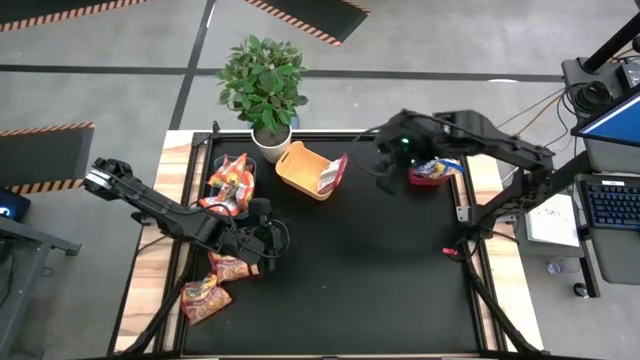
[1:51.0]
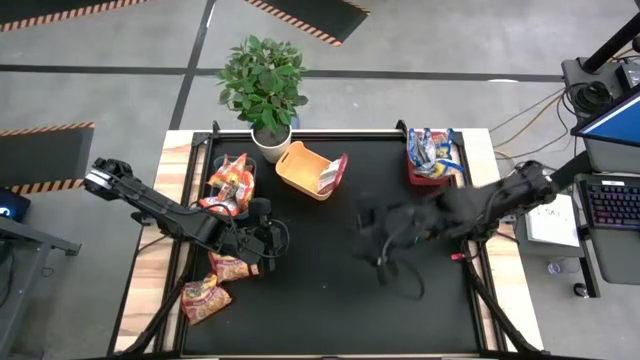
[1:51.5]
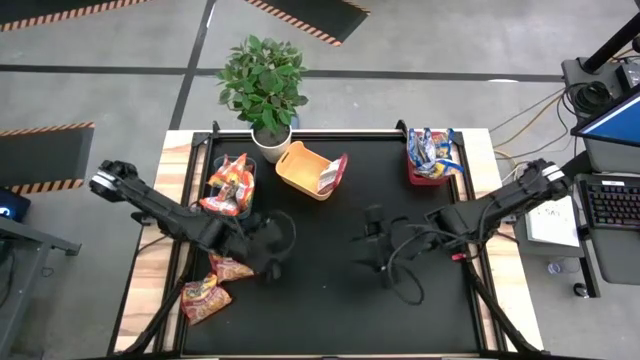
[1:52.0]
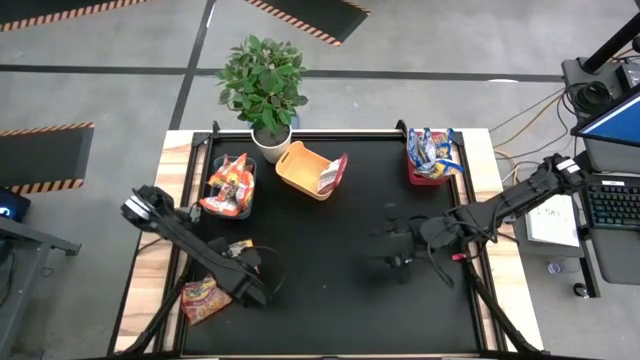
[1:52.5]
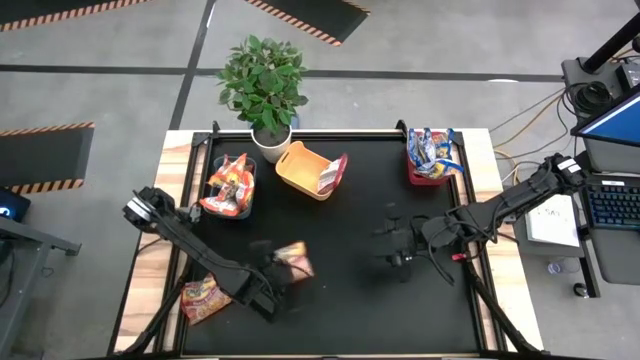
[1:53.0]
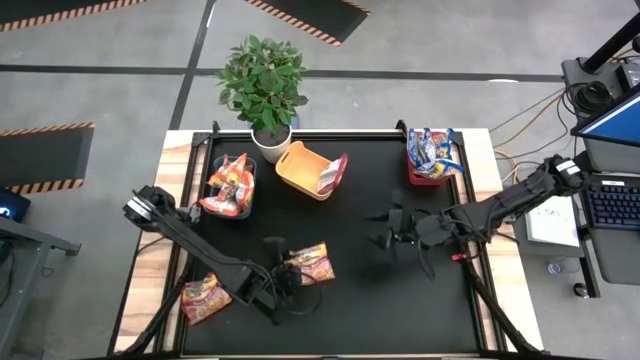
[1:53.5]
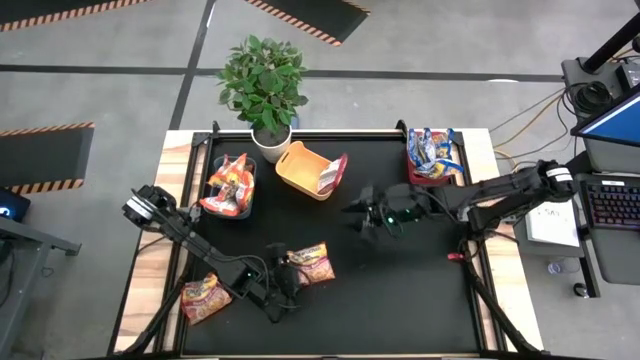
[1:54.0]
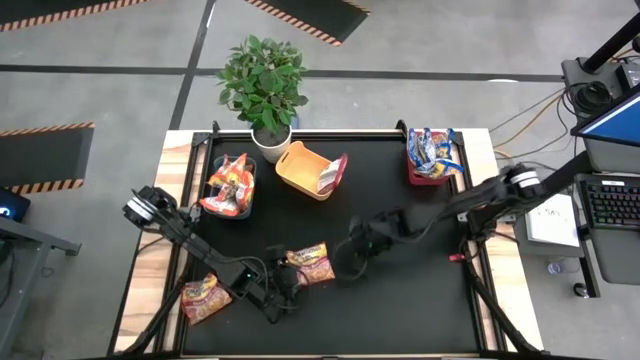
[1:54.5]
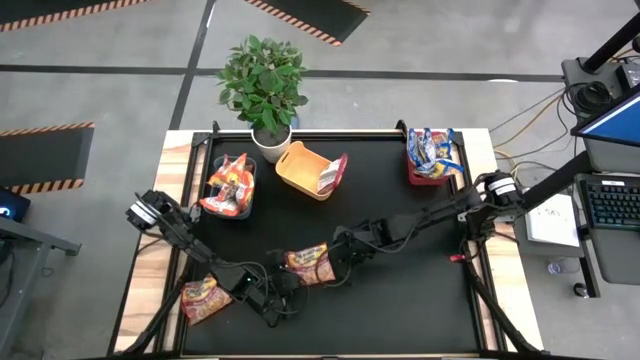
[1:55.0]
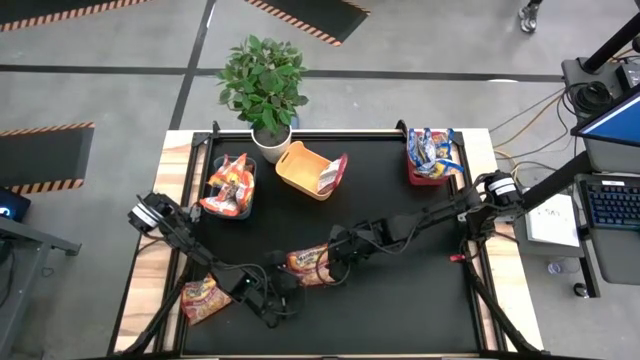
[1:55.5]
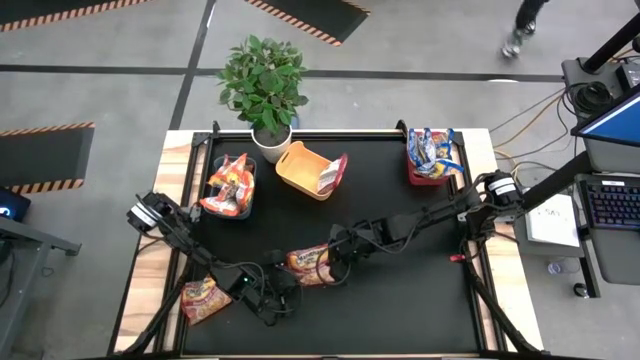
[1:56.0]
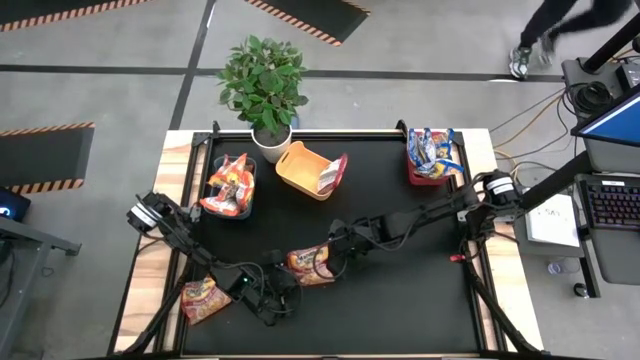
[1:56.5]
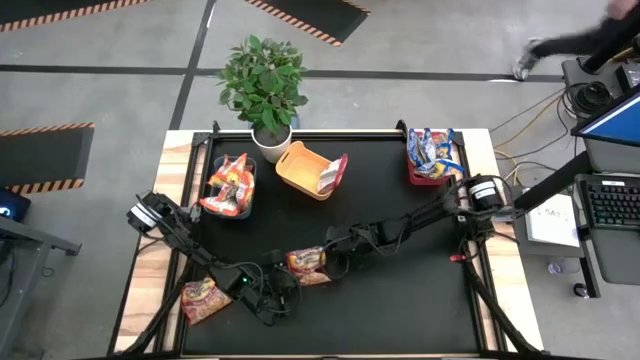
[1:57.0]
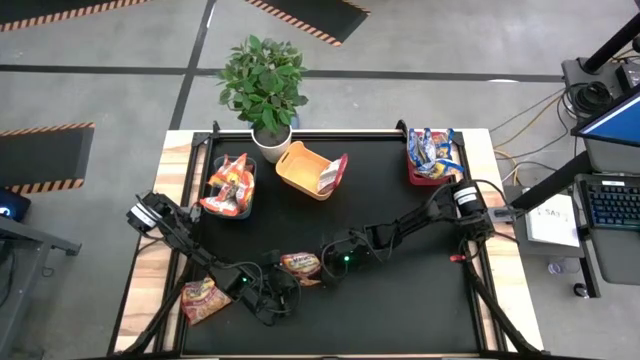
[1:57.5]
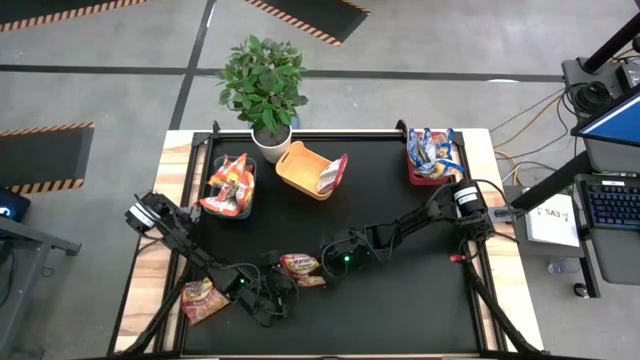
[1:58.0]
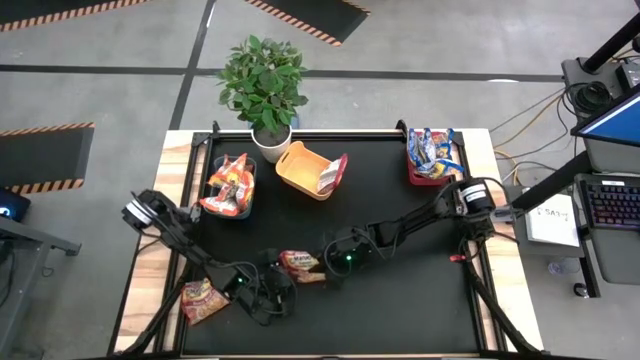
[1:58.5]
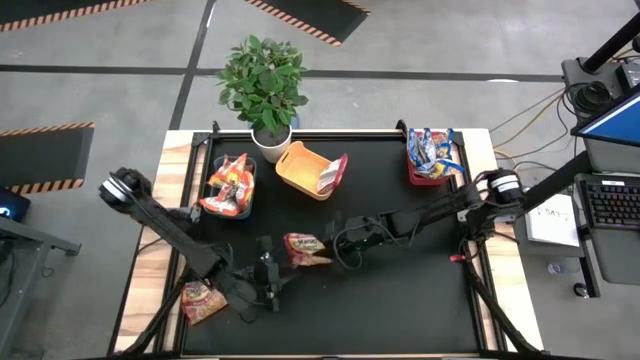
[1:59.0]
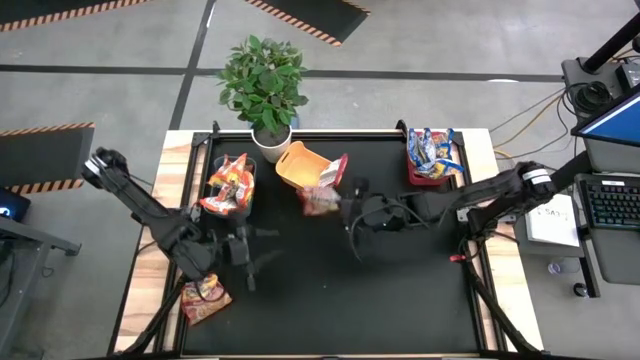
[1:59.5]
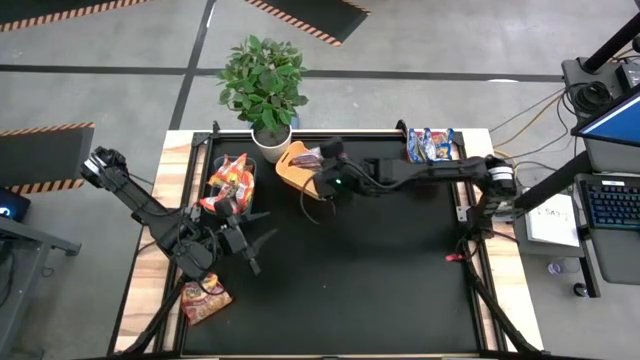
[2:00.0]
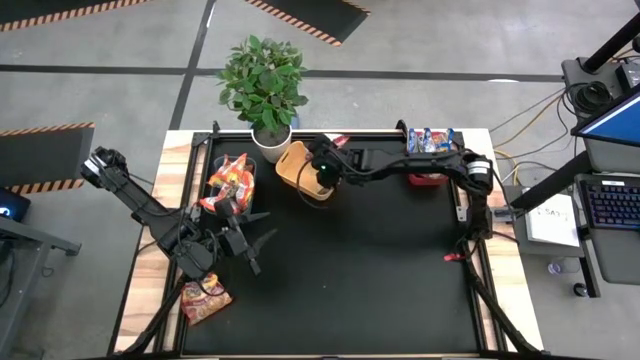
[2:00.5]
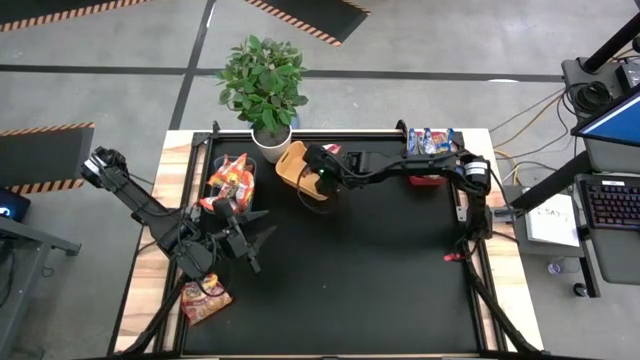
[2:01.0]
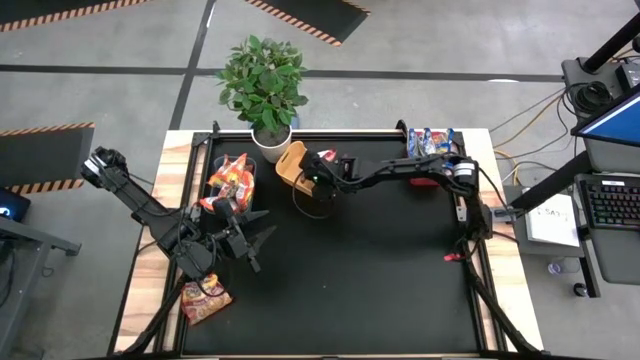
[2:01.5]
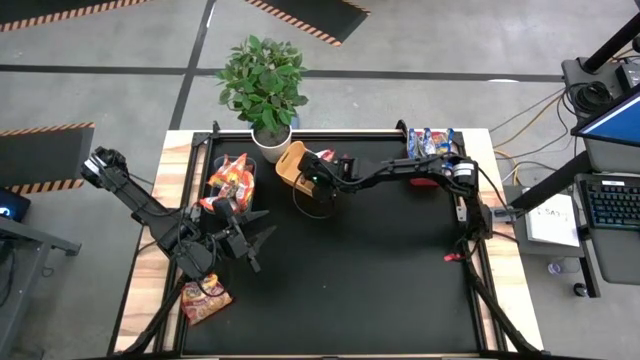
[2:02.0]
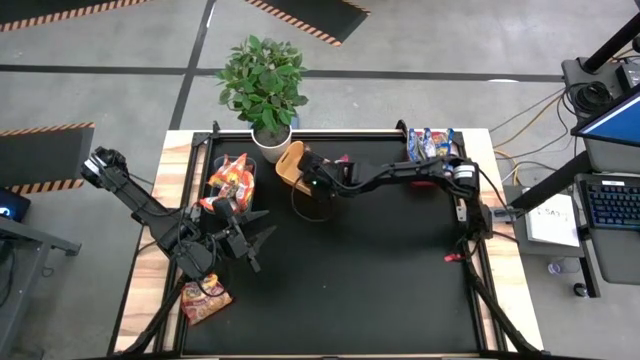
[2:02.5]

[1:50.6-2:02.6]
Task: Sort Maruchan noodles
Put the right red noodle pack into the yellow bin

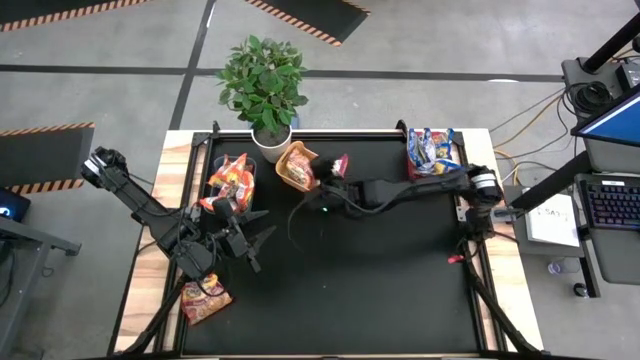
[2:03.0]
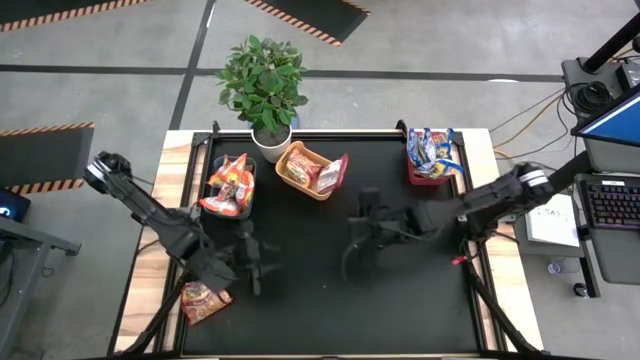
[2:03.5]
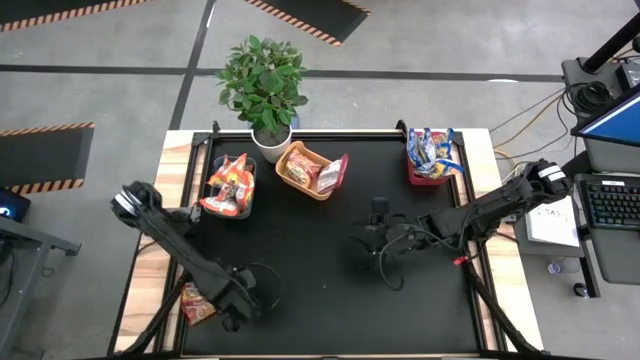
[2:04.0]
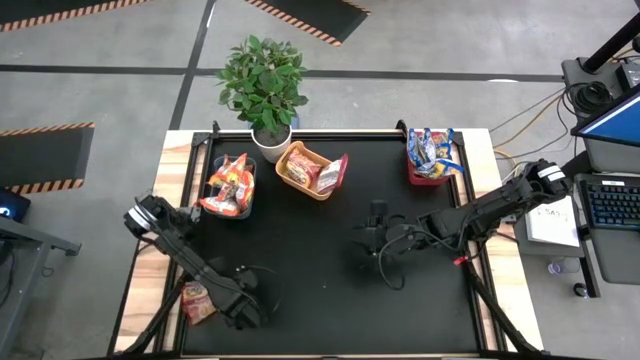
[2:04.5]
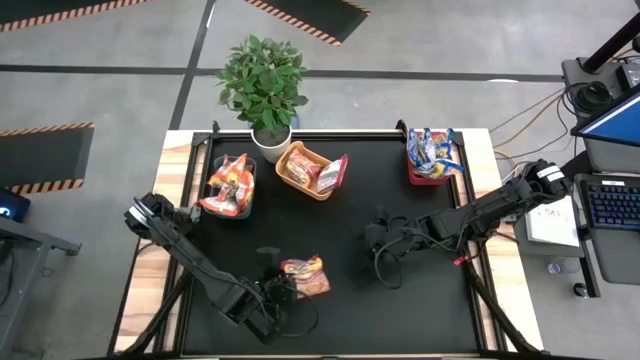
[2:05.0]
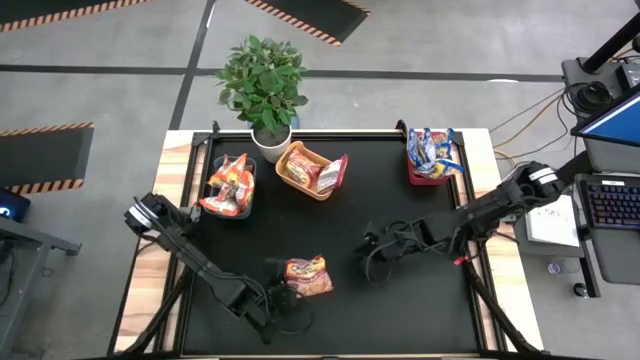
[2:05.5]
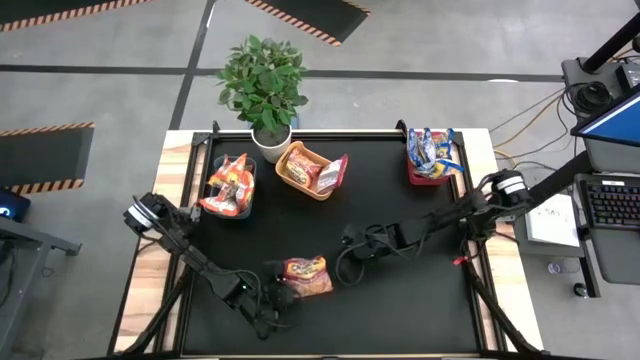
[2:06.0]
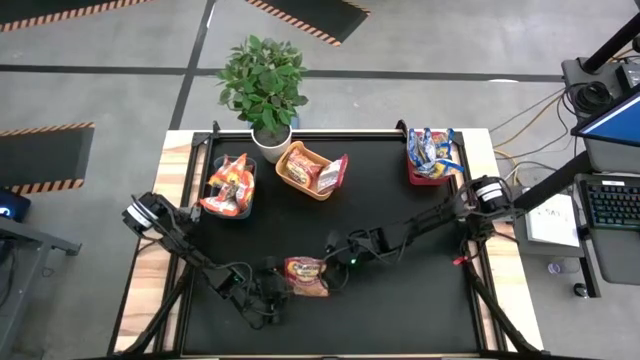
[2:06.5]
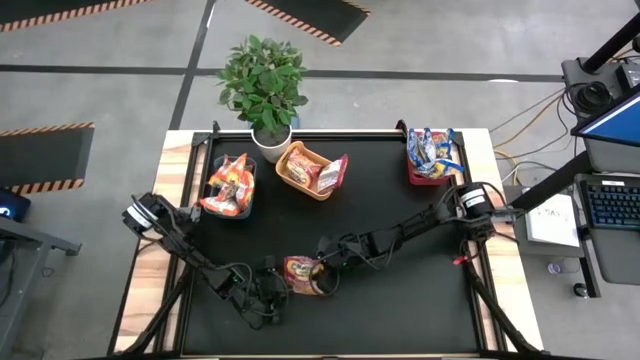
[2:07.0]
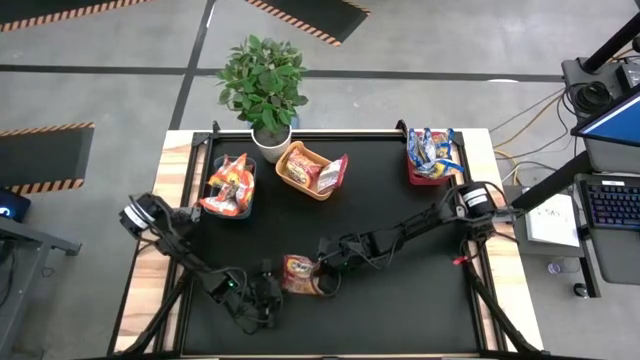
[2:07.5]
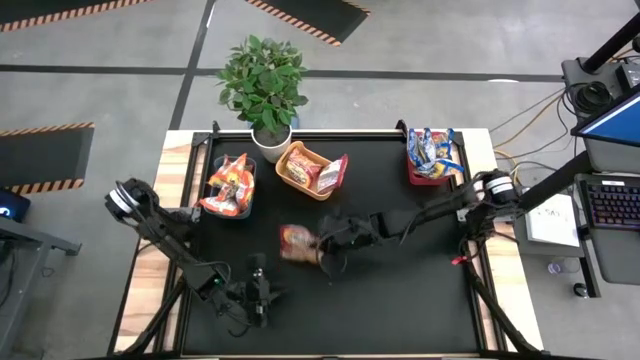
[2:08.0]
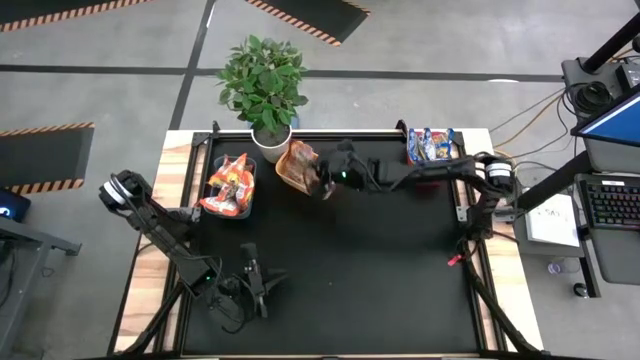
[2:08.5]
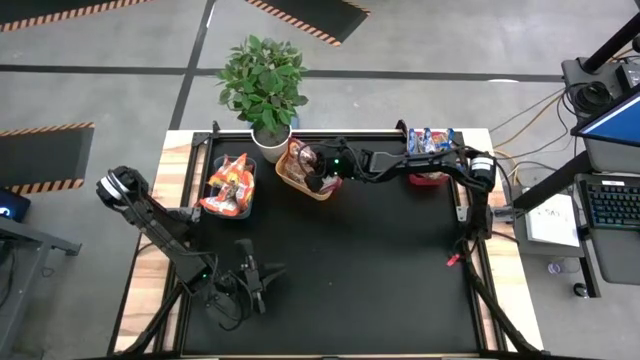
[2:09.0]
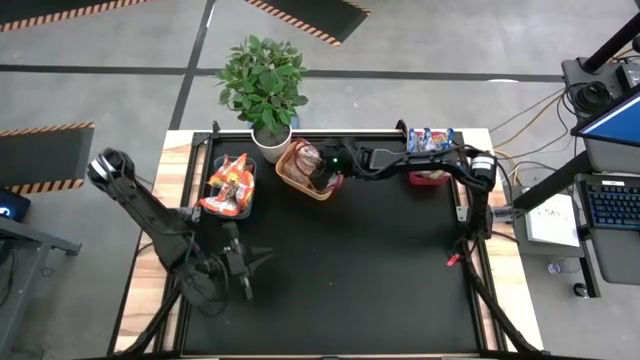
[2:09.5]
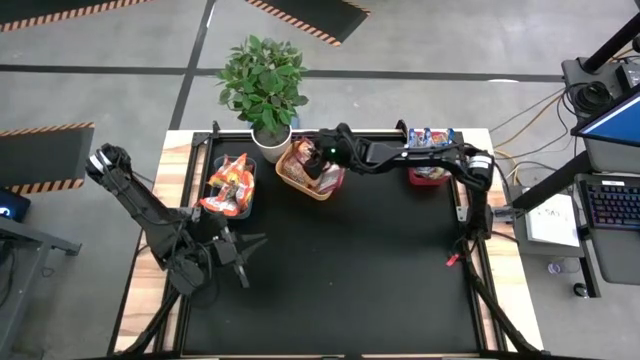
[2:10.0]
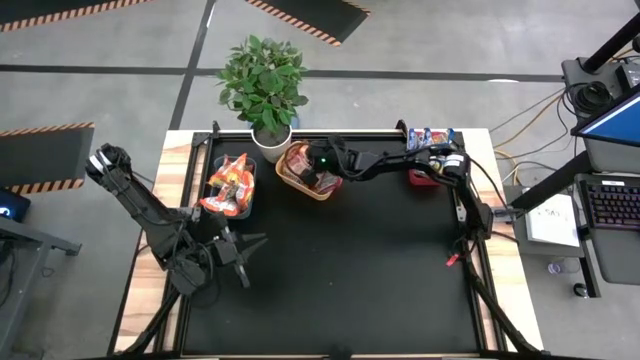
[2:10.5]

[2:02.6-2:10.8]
Put the red noodle pack into the yellow bin

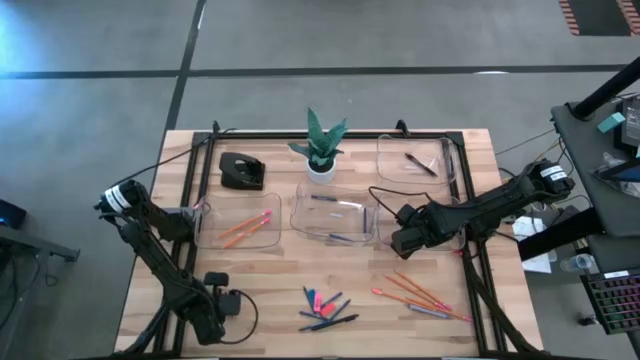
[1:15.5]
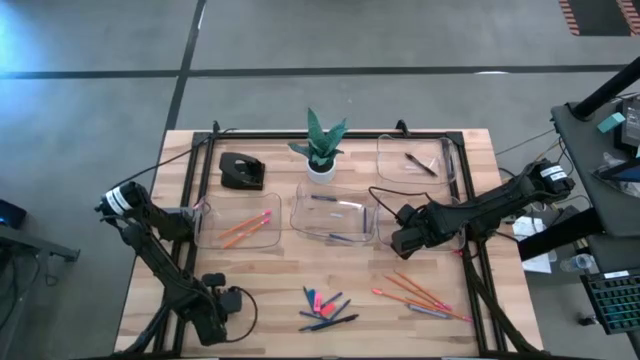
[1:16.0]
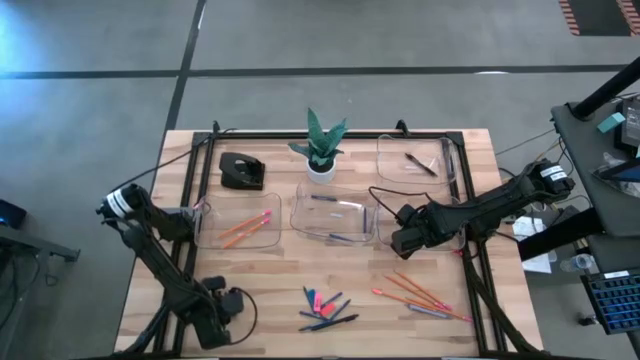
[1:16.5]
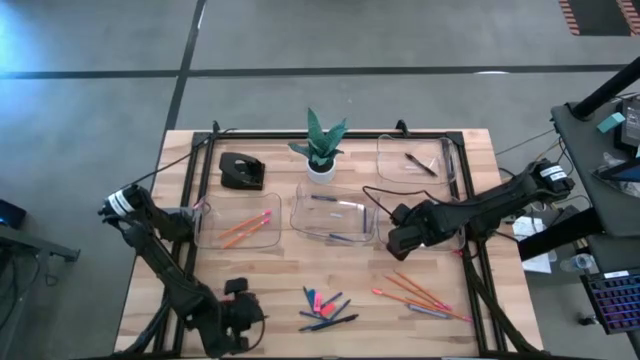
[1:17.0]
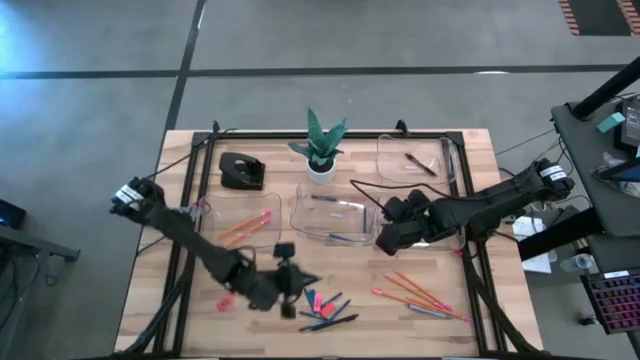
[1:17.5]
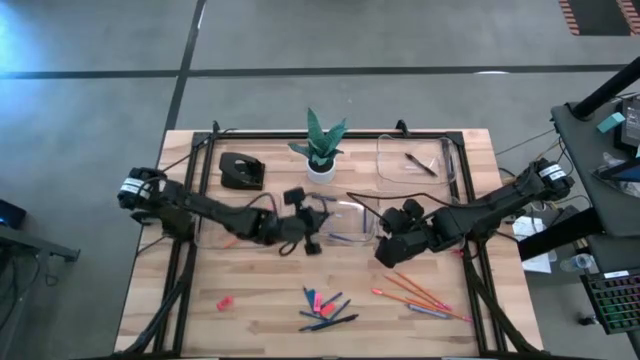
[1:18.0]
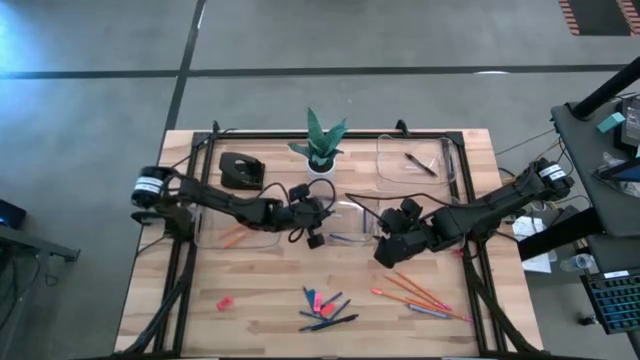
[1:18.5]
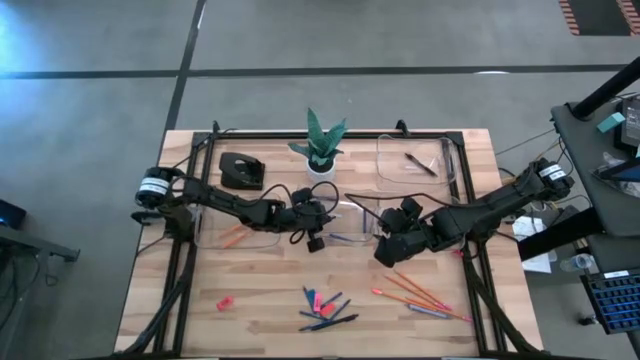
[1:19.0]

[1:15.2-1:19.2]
Task: Sort crayons/erasers/pens/pencils in bins
Put the blue crayon into the middle transparent bin
